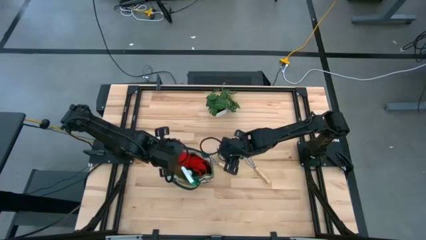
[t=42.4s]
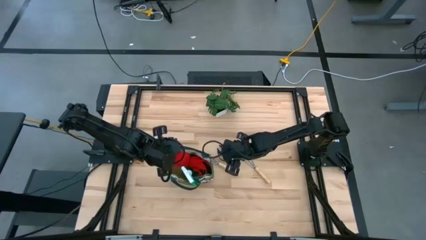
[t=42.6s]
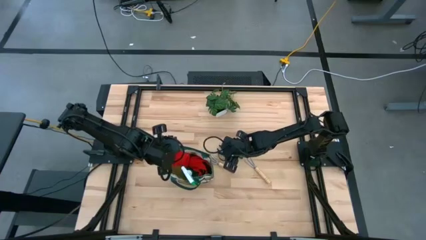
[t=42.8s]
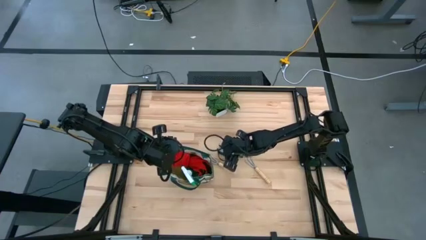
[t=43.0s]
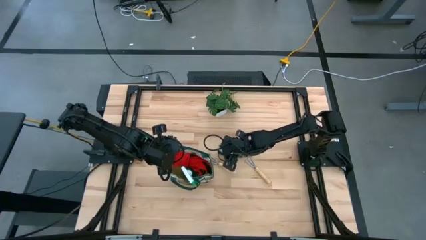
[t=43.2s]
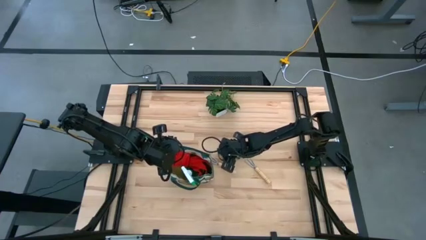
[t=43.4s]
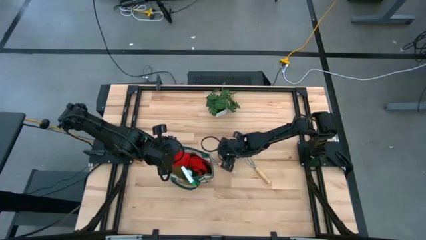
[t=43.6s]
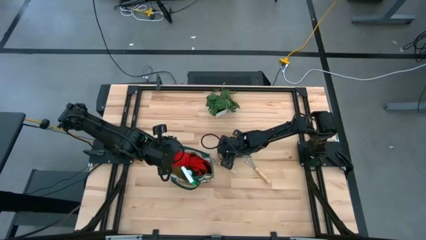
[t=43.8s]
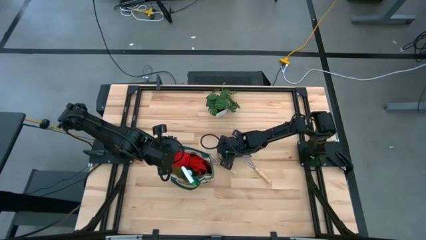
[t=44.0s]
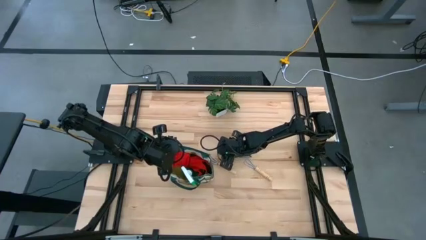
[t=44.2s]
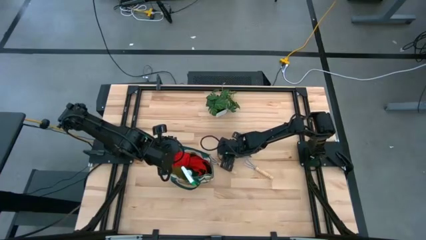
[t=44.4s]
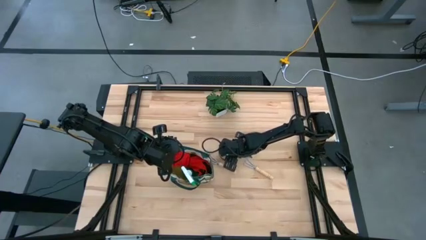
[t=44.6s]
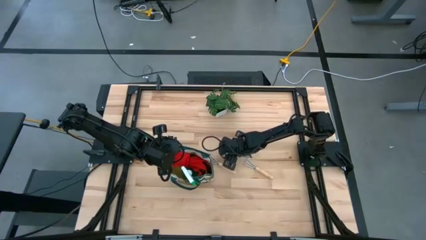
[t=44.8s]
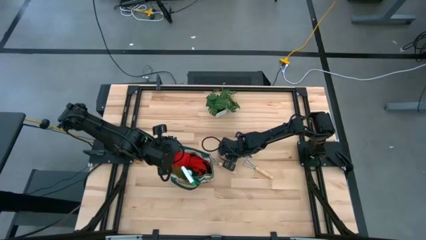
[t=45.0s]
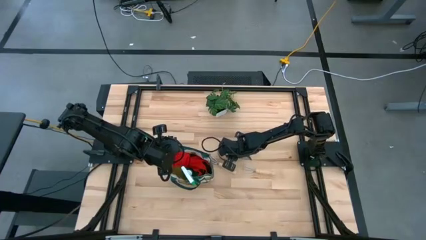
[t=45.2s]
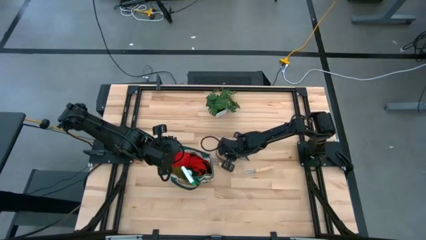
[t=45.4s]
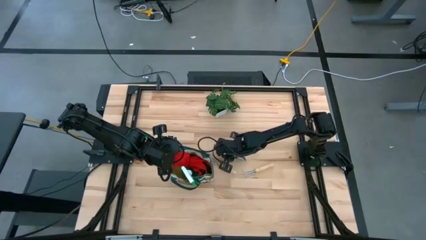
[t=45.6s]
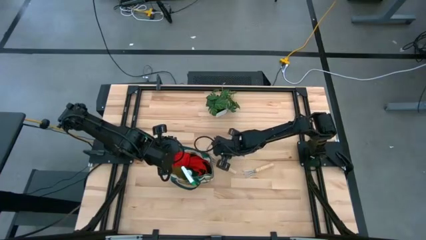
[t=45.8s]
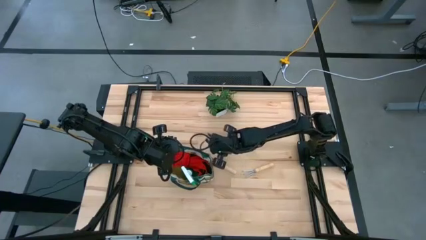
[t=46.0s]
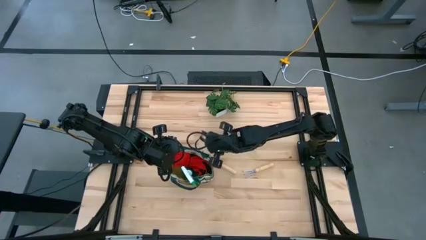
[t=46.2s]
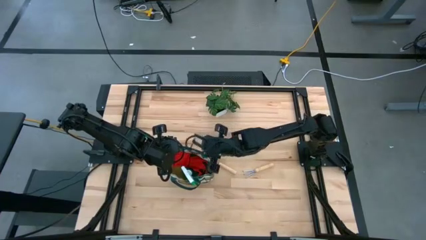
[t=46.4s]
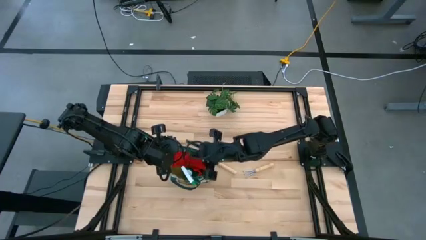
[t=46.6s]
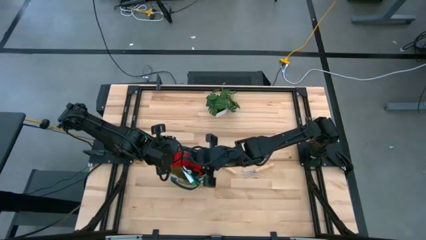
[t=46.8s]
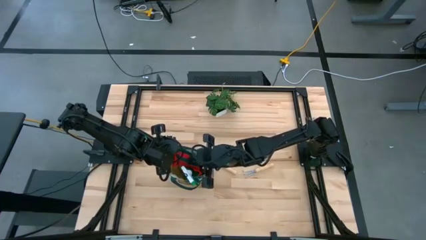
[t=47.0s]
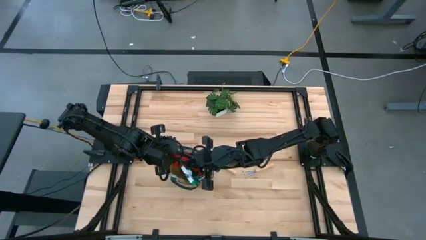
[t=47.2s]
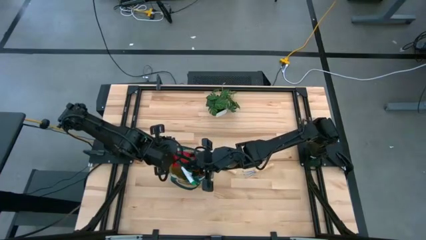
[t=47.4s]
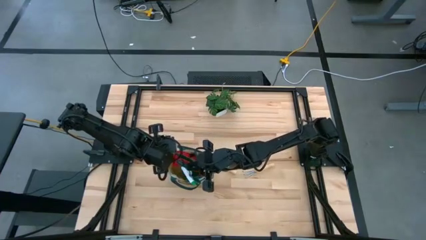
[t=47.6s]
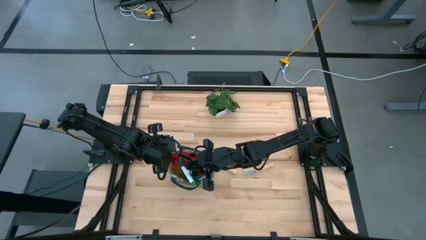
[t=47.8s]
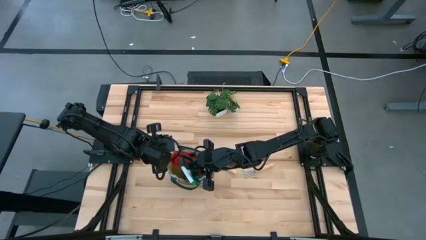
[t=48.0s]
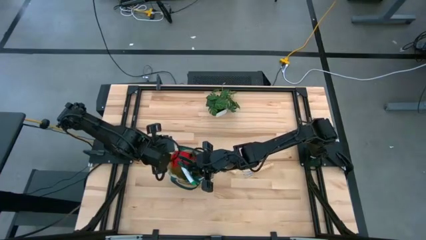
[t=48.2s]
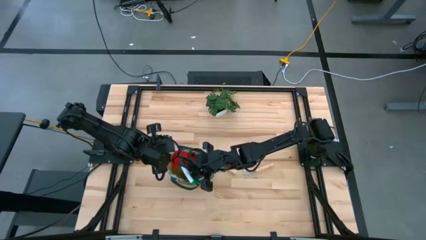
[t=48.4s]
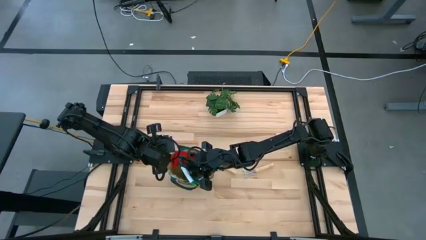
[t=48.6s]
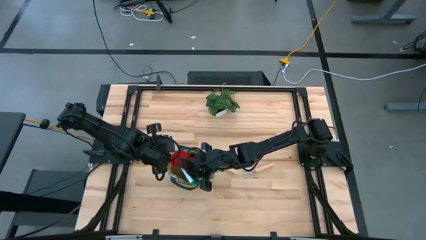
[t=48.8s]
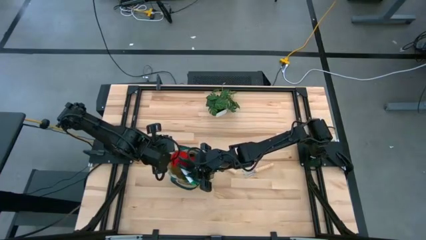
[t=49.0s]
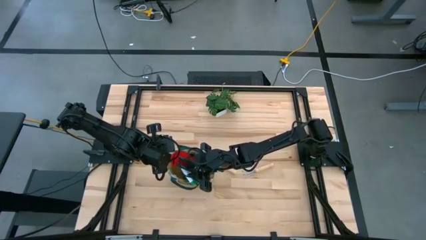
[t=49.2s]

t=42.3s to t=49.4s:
Task: Pick & Place Garden tools in Gardening bag
Put the green shear scissors into the green gardening bag

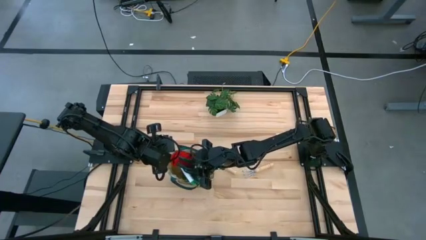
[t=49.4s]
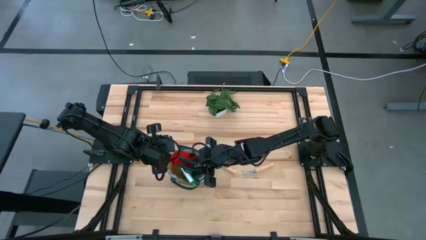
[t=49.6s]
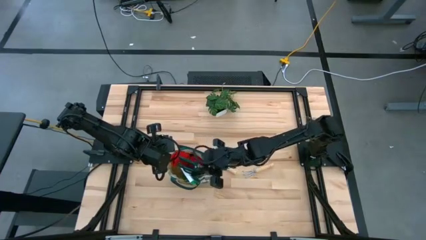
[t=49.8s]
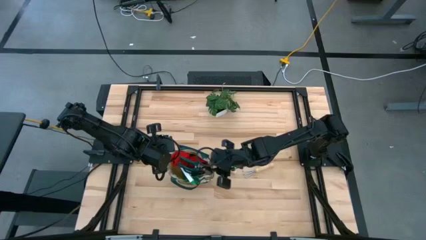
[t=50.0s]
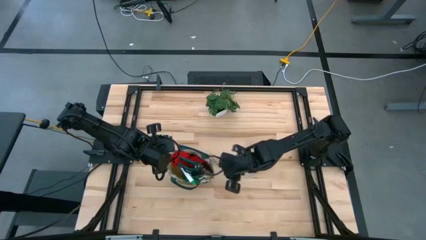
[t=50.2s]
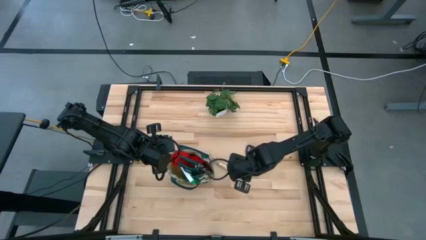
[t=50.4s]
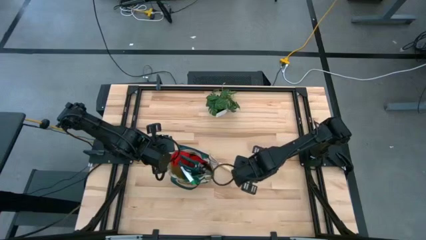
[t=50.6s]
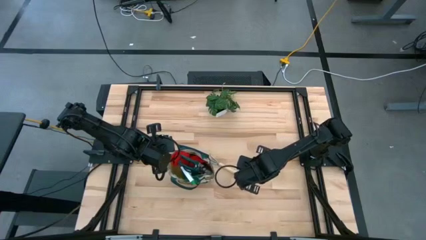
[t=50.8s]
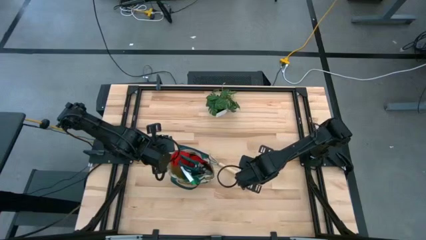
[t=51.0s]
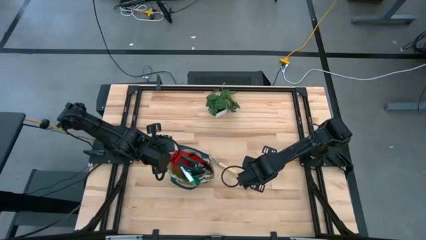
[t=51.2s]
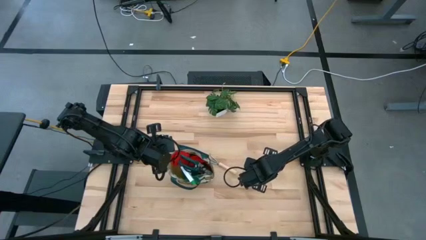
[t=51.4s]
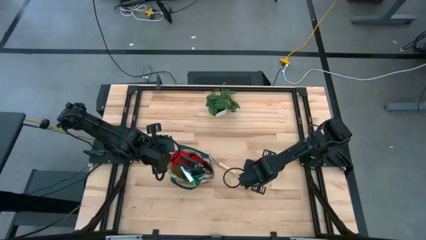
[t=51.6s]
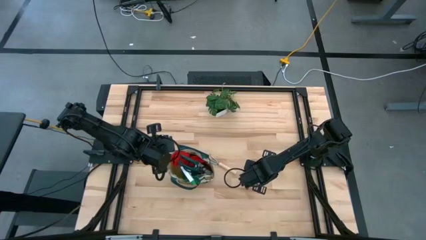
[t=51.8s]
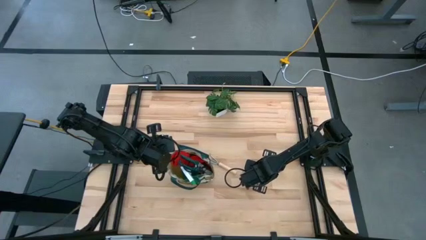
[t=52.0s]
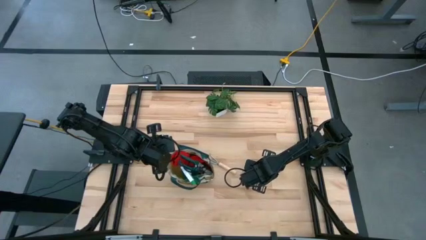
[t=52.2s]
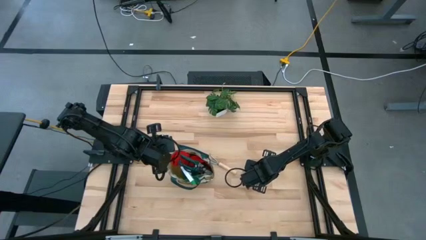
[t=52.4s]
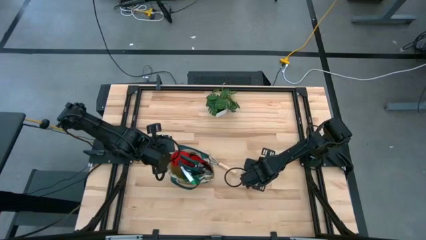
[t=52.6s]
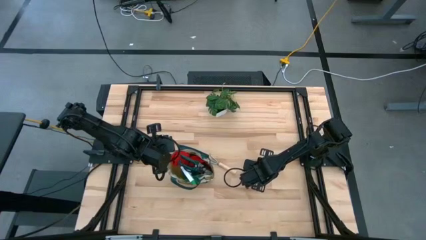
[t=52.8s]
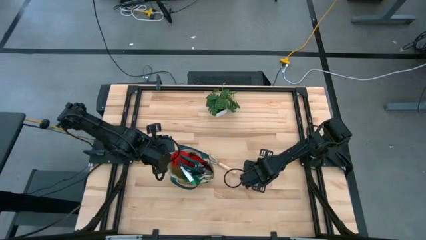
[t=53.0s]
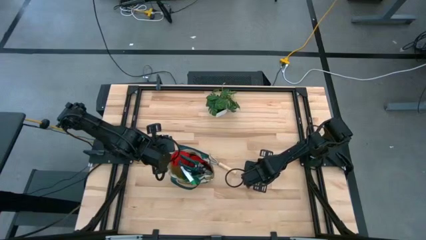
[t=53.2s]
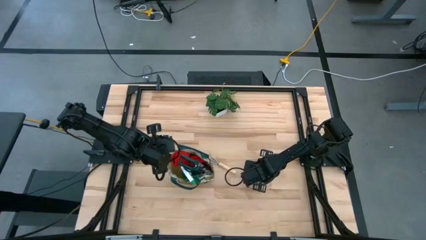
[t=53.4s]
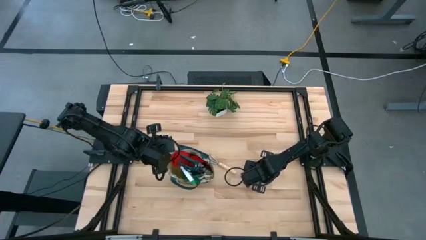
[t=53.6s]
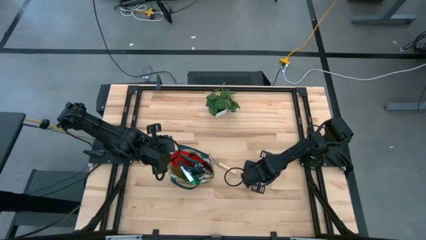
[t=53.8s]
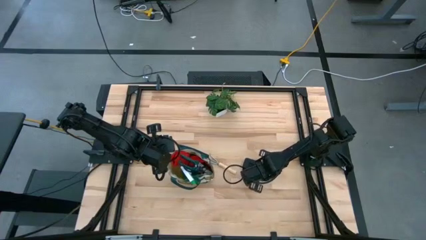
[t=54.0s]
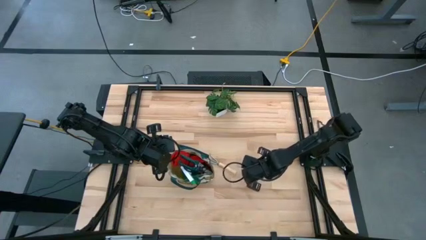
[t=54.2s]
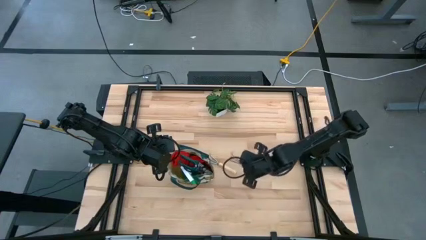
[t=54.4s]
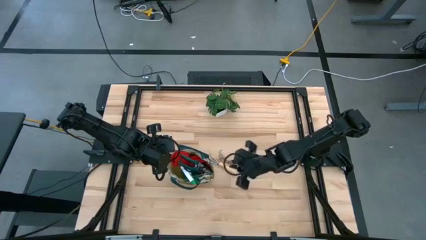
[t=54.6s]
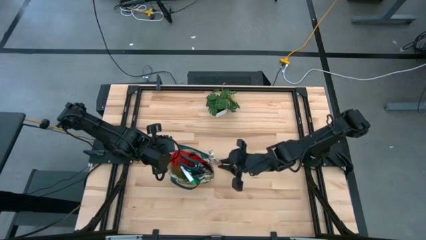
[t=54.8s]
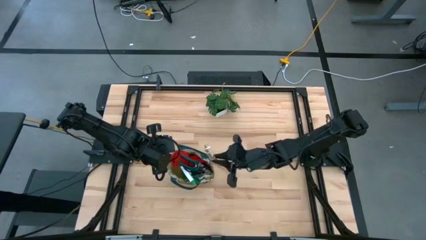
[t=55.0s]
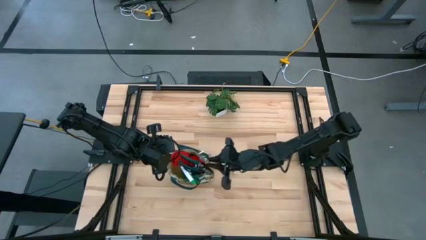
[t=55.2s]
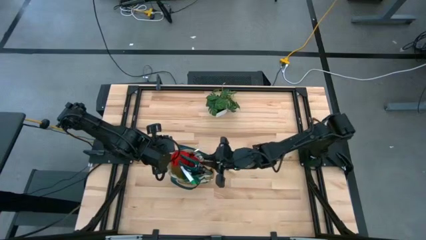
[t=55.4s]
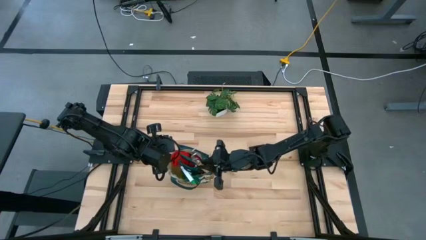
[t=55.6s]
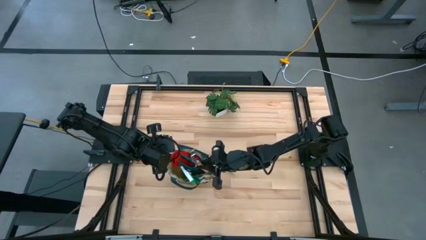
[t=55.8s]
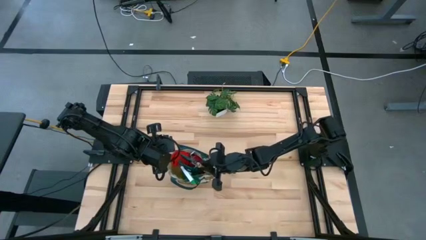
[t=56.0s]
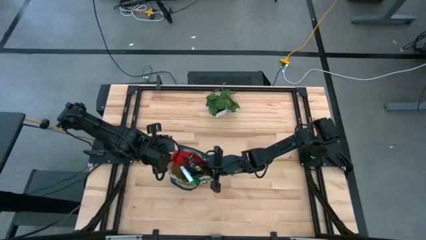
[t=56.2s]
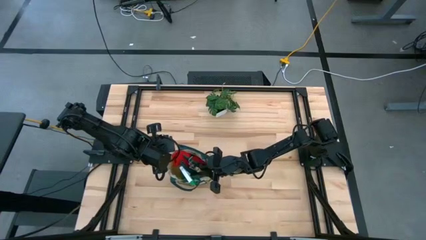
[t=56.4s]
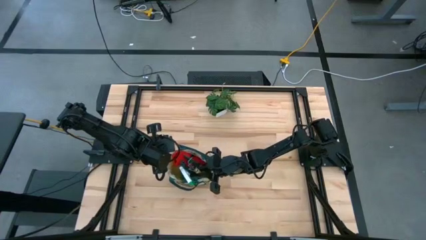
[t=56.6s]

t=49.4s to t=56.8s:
Put the right brown hand rake into the green gardening bag
